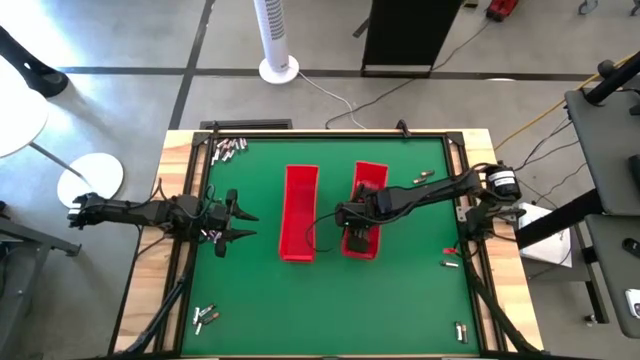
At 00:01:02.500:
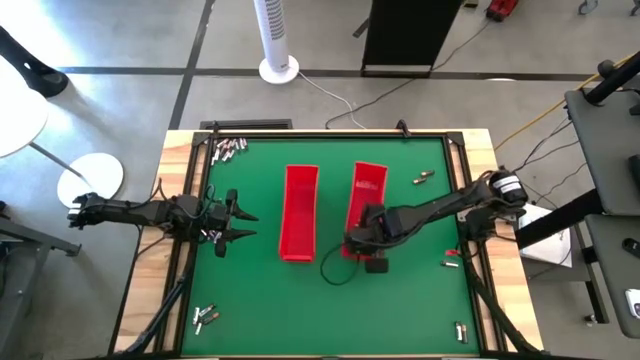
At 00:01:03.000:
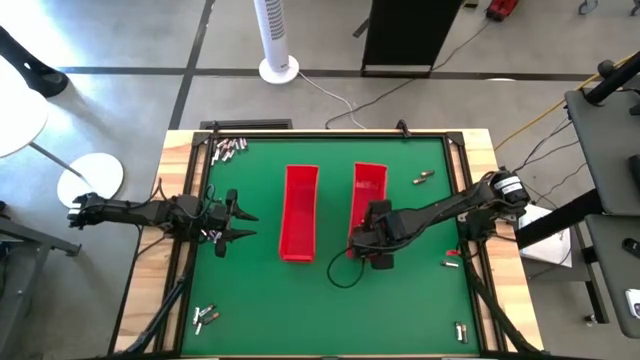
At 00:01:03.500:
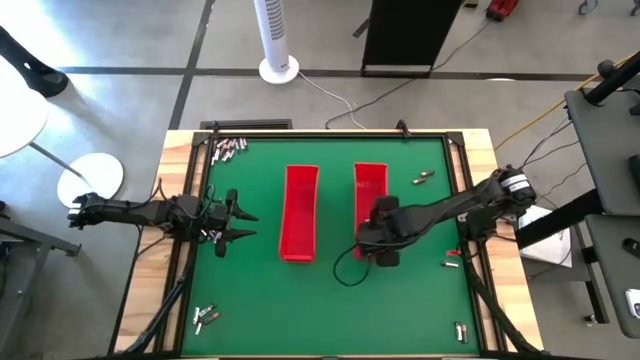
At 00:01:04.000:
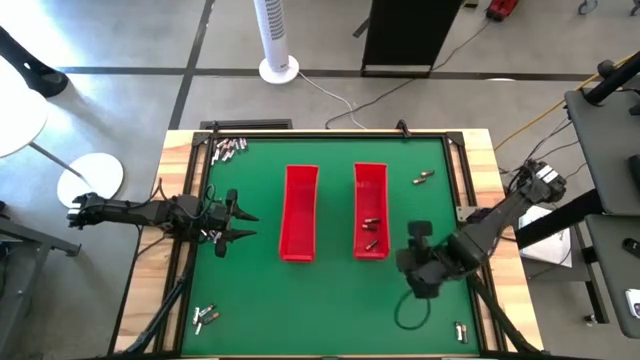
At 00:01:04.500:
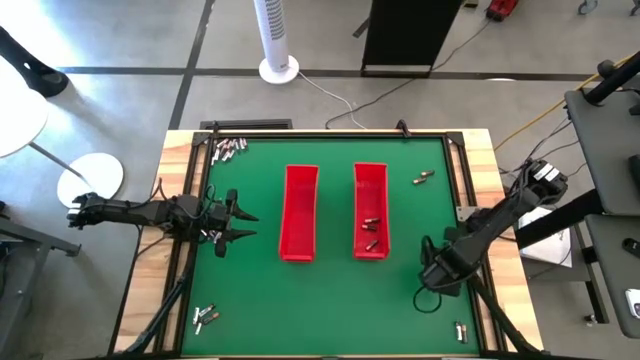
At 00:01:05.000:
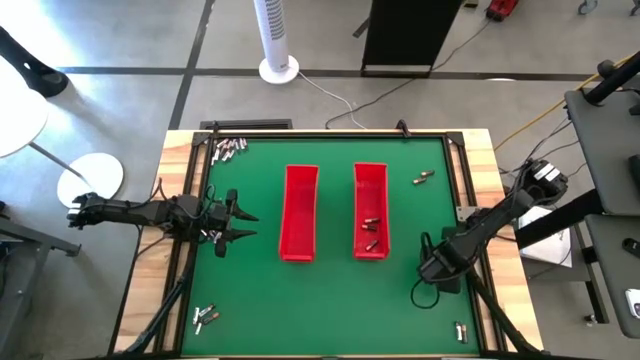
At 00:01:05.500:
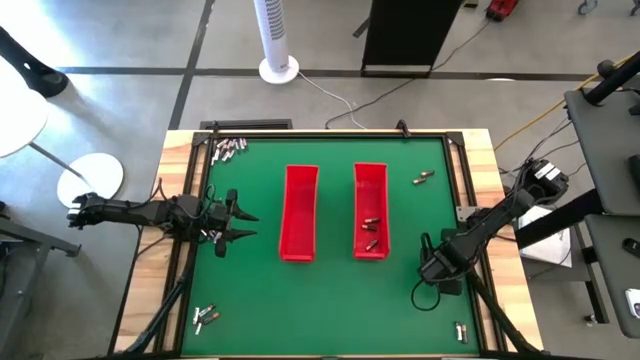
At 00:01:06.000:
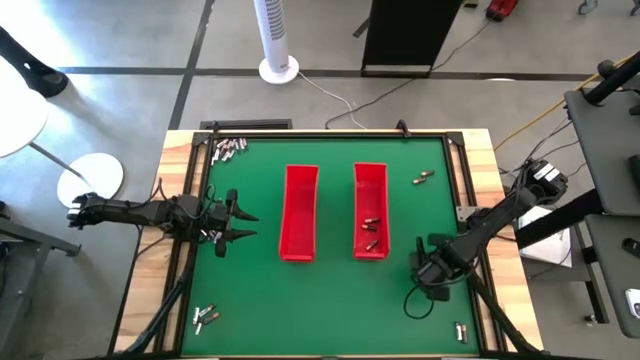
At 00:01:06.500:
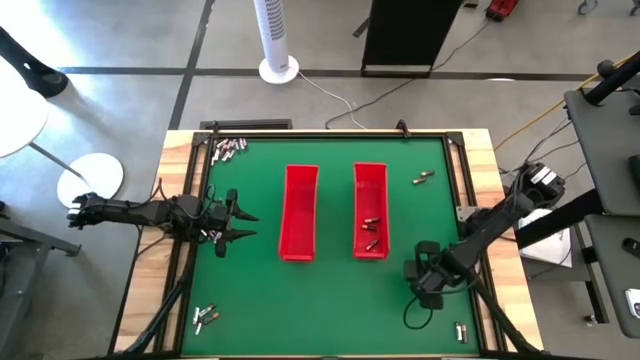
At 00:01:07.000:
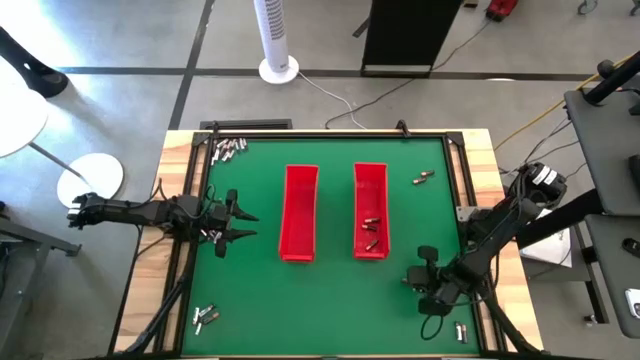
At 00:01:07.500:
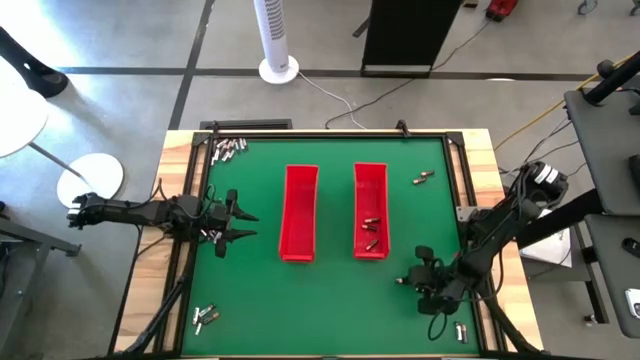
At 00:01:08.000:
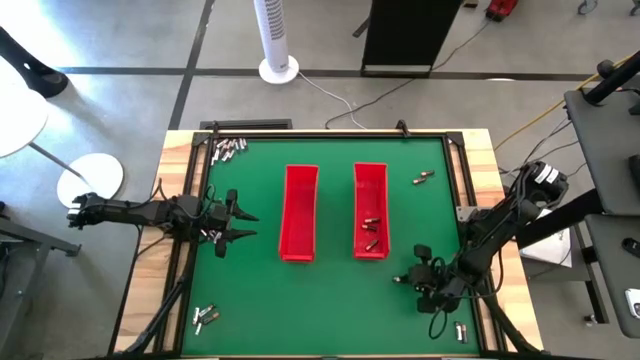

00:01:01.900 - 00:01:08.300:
Task: Sort batteries
Put the silver battery into the left red bin

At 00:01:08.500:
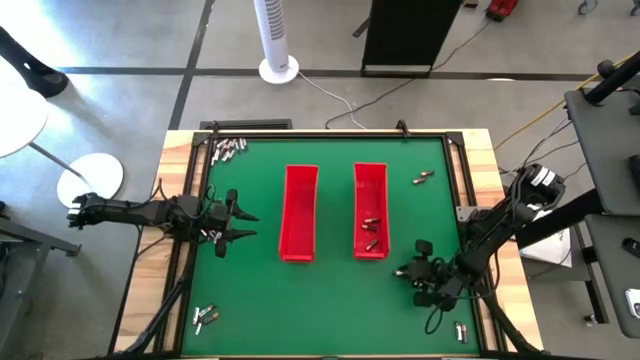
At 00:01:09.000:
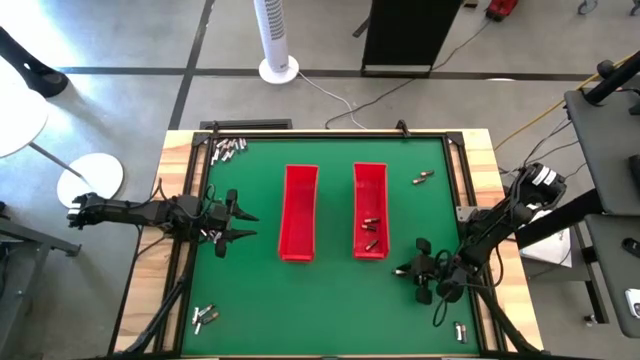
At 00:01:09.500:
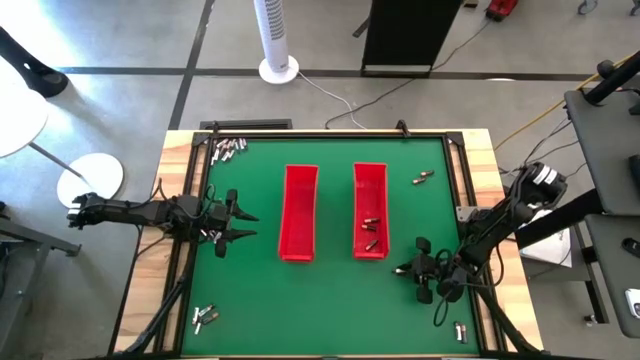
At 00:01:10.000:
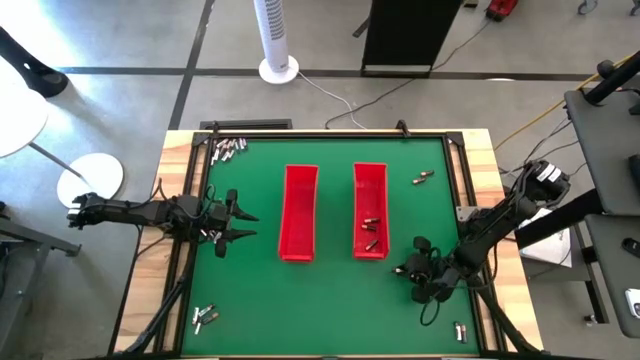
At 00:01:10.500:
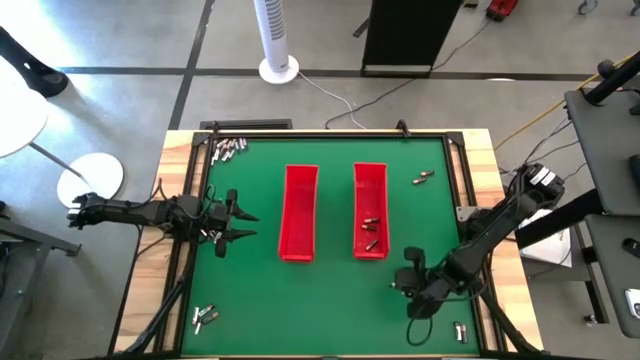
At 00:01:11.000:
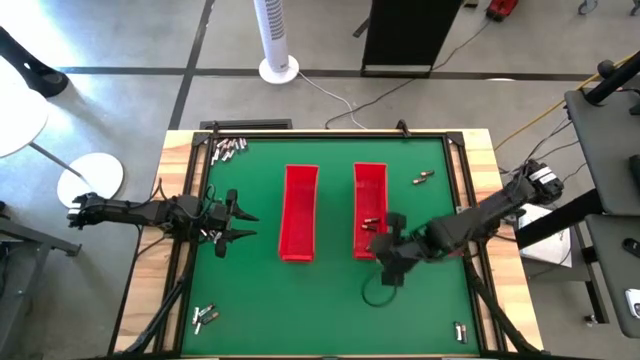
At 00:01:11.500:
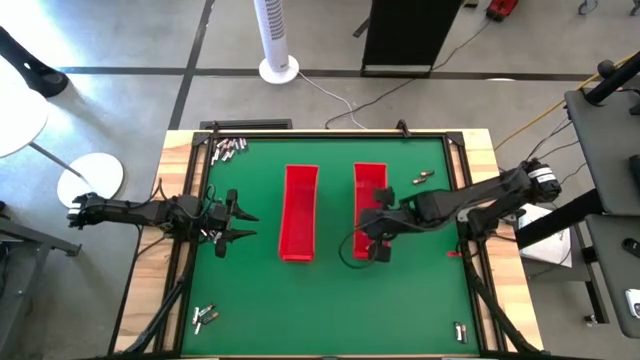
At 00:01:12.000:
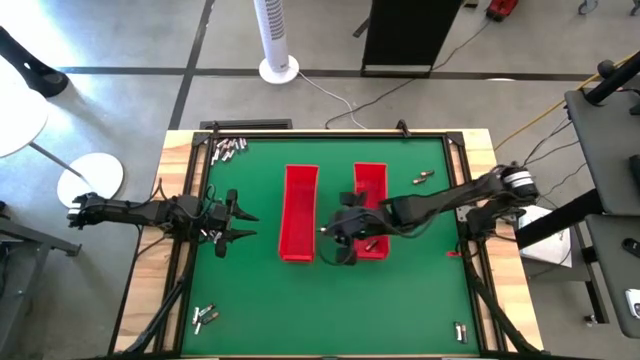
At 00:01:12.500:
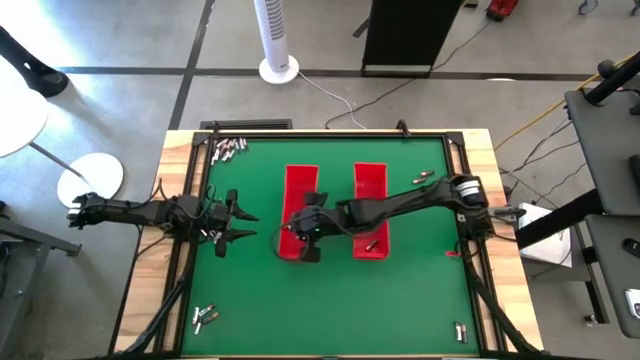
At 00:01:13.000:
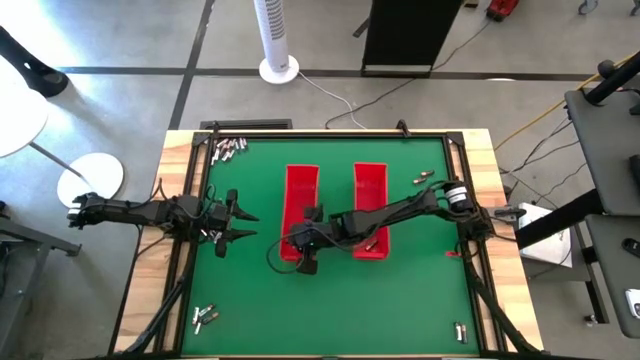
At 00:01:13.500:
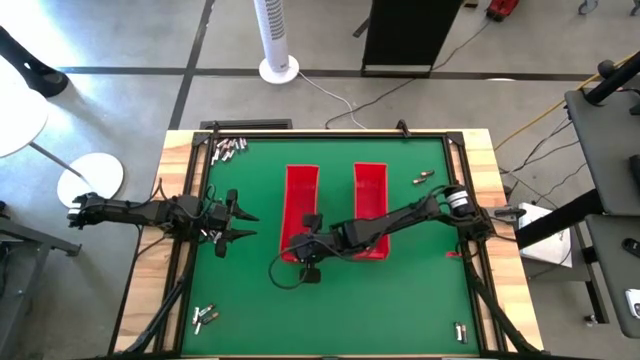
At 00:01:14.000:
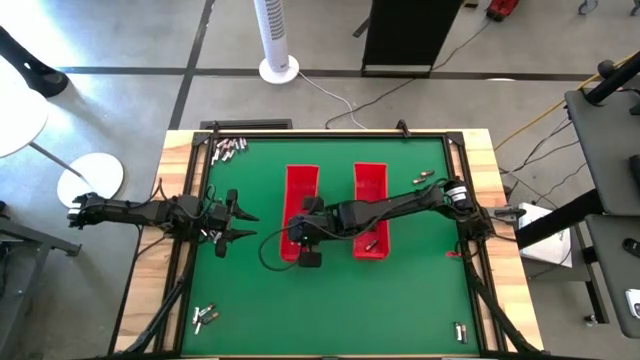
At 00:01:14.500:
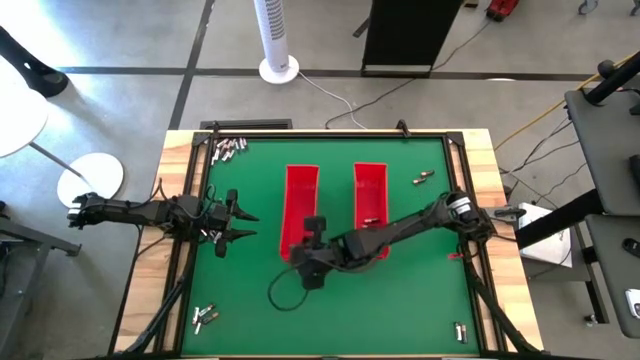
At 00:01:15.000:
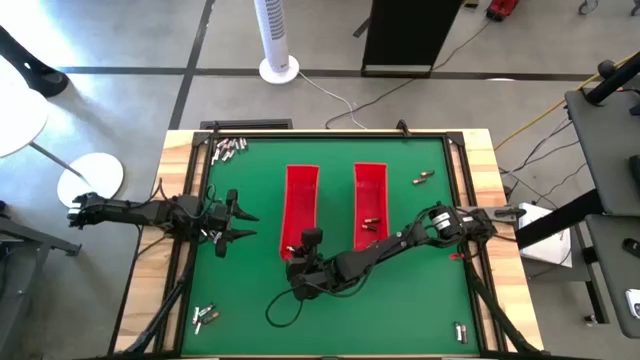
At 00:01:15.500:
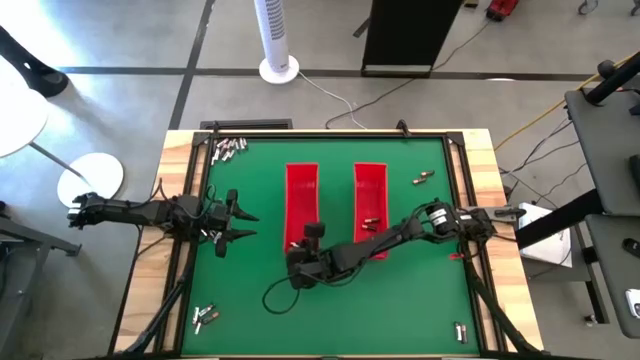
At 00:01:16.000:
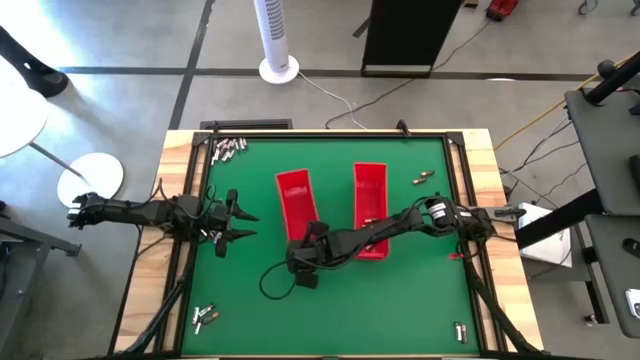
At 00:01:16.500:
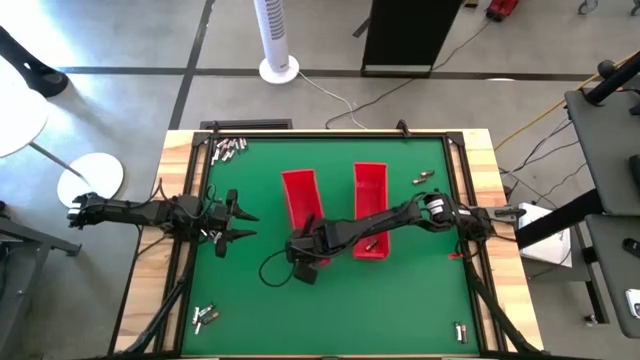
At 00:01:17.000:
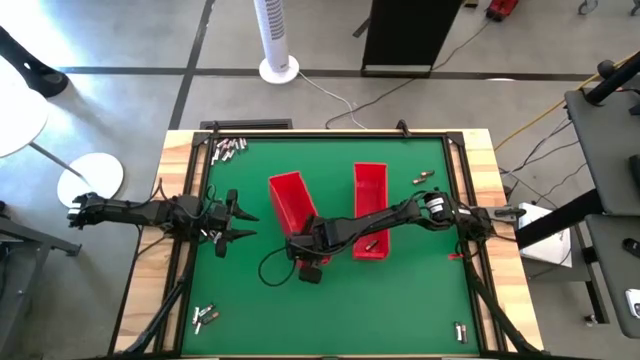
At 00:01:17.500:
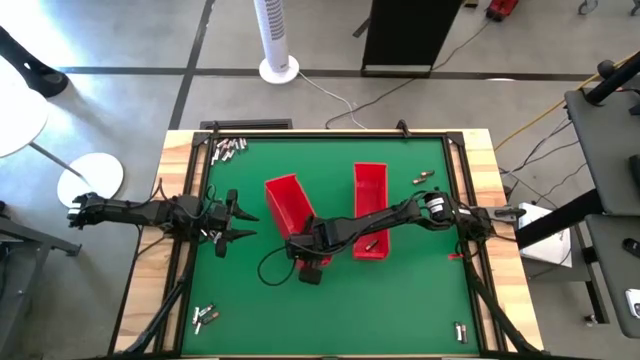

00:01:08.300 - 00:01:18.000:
Put the silver battery into the left red bin

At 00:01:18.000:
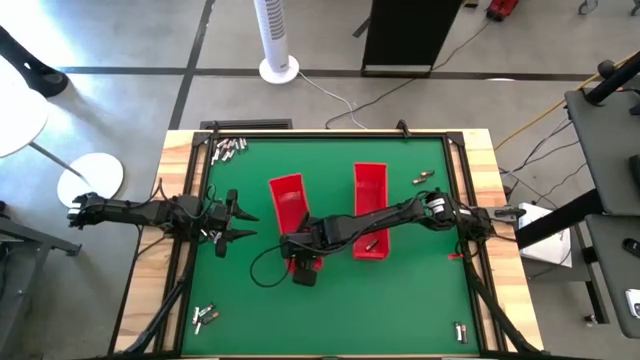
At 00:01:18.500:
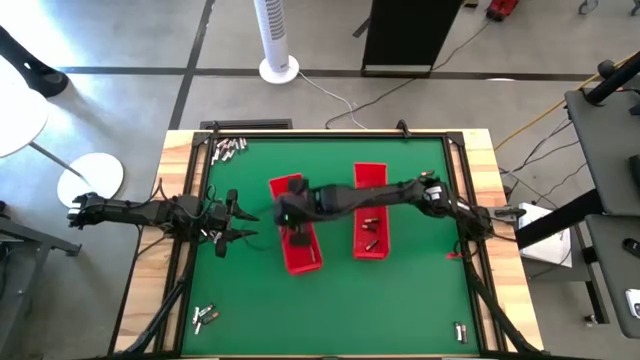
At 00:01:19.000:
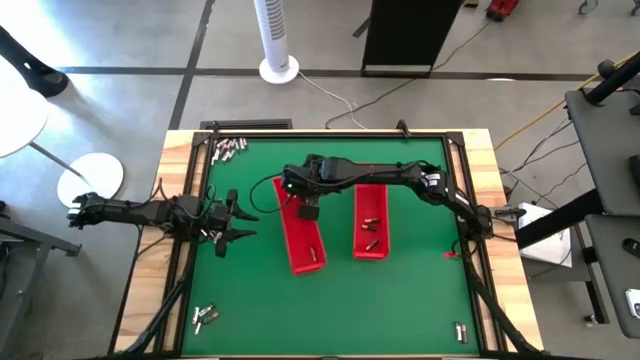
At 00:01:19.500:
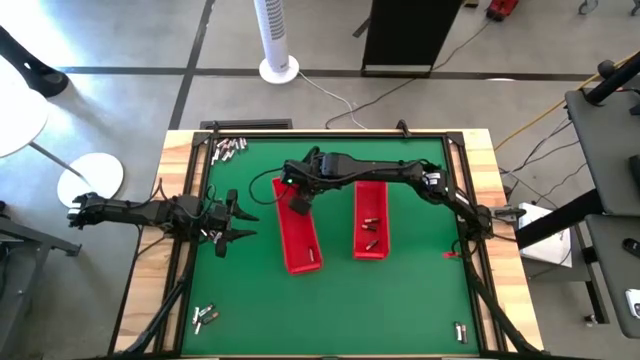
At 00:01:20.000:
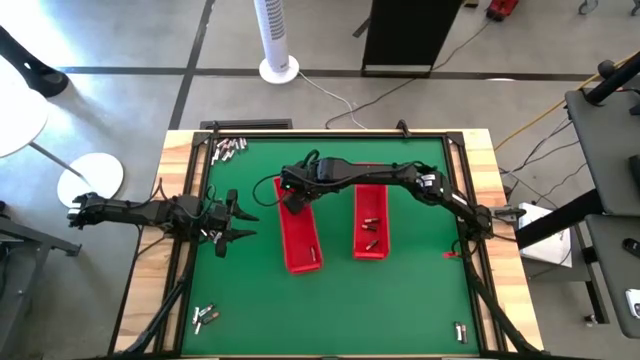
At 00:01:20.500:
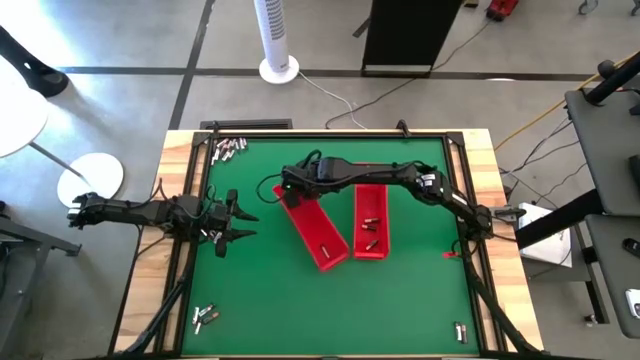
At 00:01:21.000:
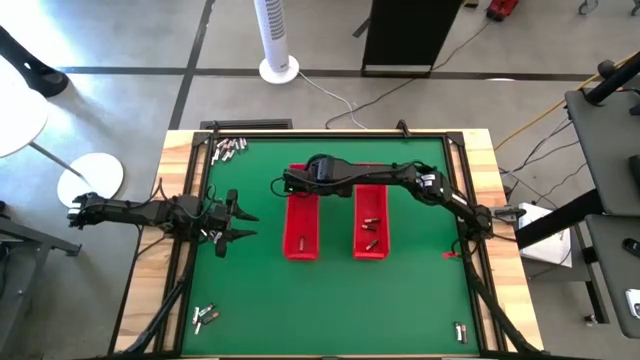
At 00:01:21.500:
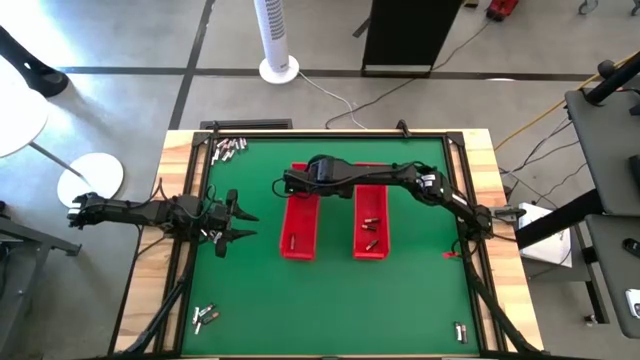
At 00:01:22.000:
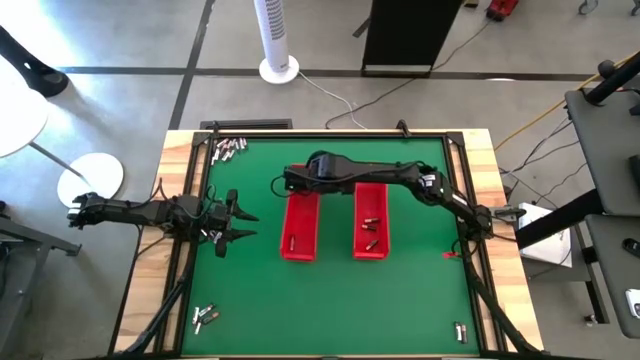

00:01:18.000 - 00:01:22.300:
Adjust the left red bin
